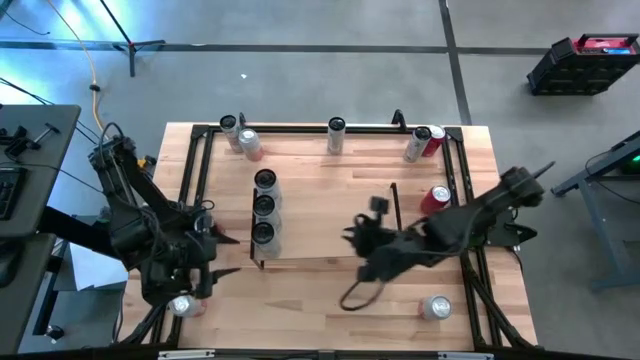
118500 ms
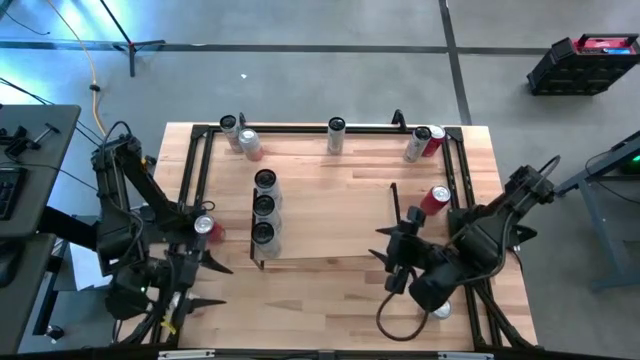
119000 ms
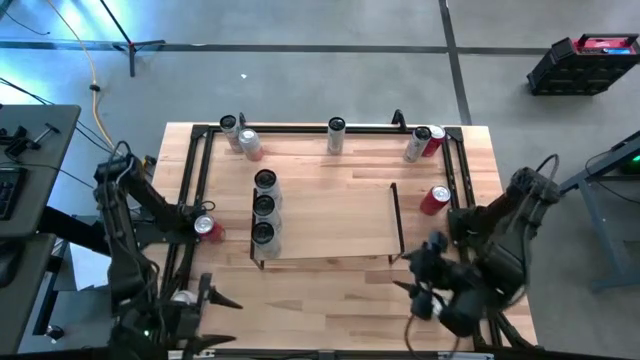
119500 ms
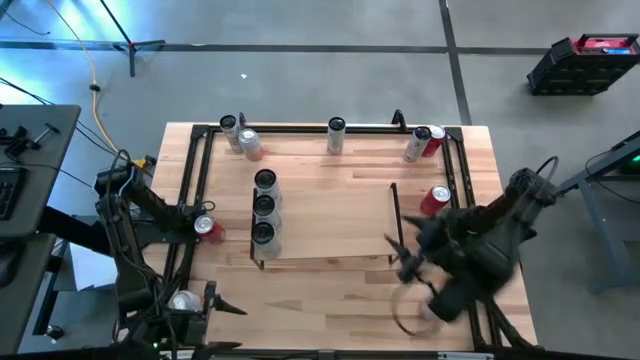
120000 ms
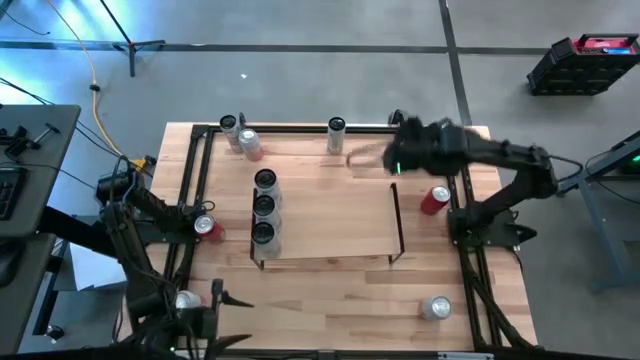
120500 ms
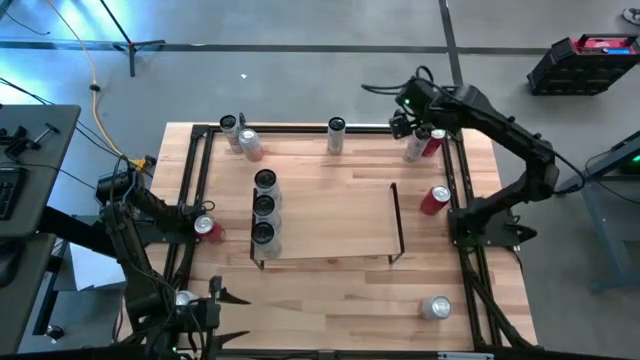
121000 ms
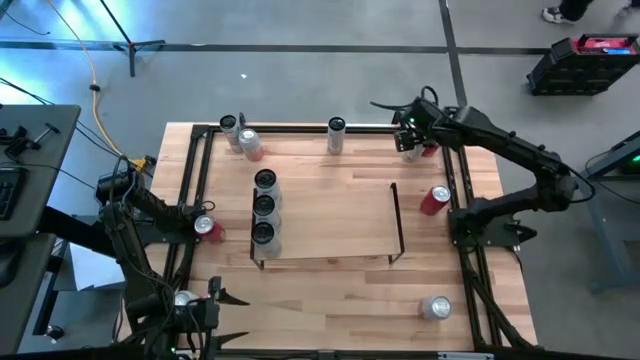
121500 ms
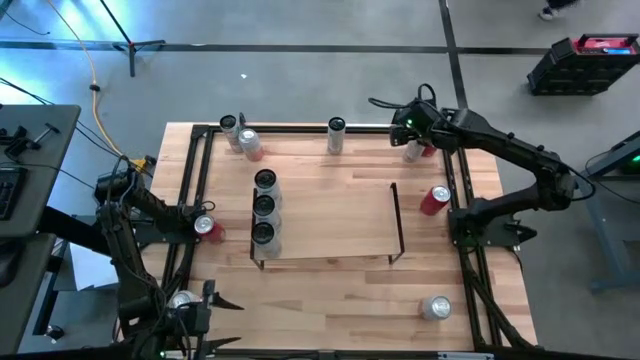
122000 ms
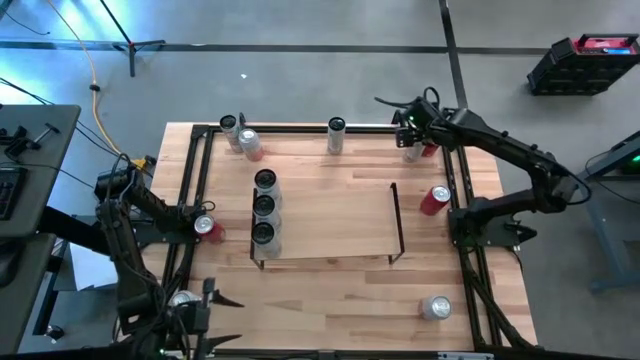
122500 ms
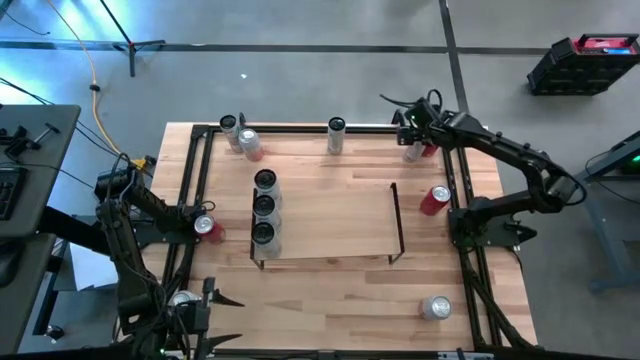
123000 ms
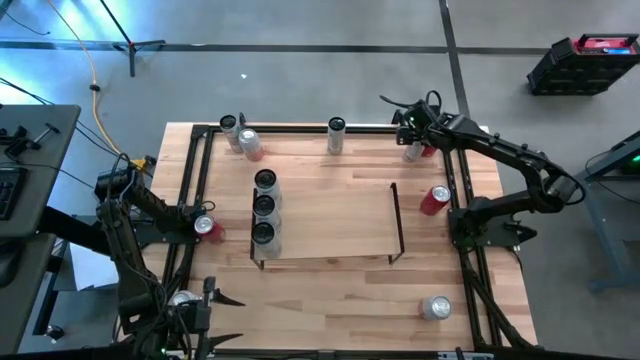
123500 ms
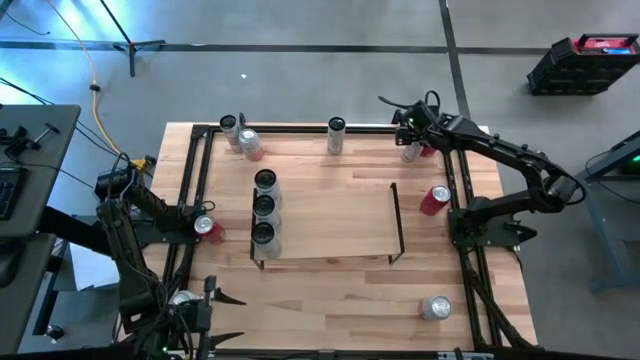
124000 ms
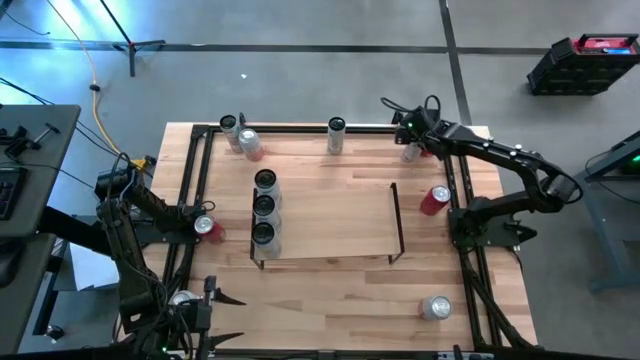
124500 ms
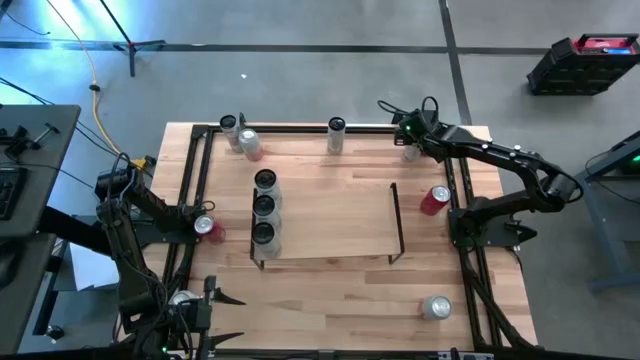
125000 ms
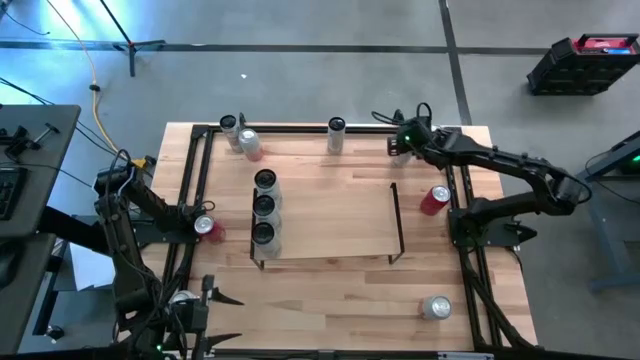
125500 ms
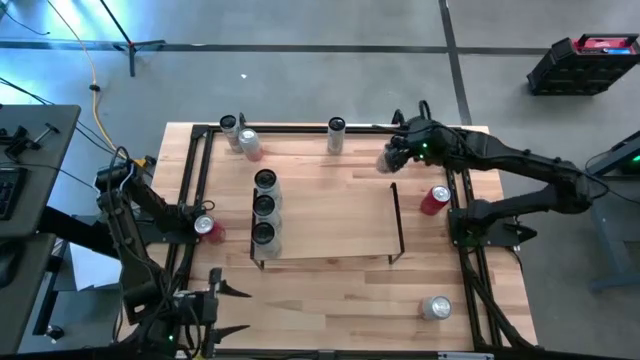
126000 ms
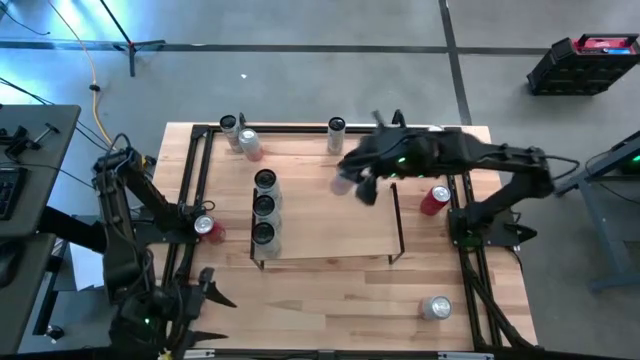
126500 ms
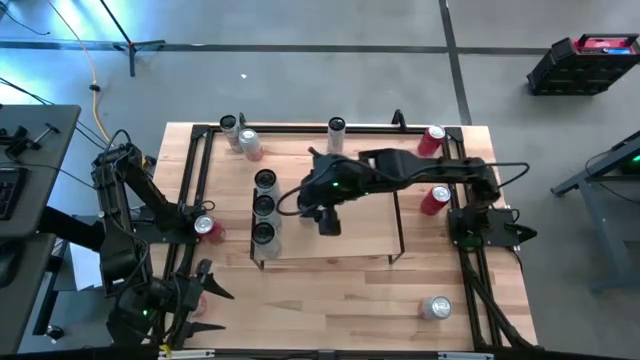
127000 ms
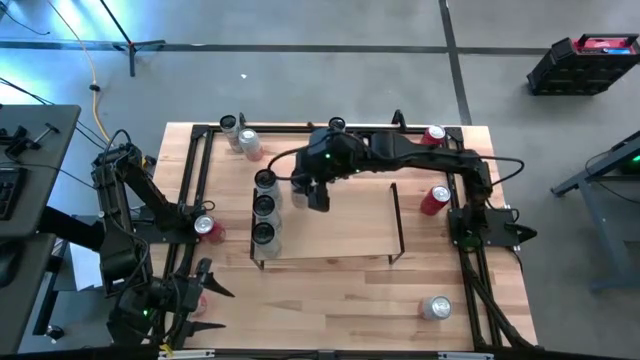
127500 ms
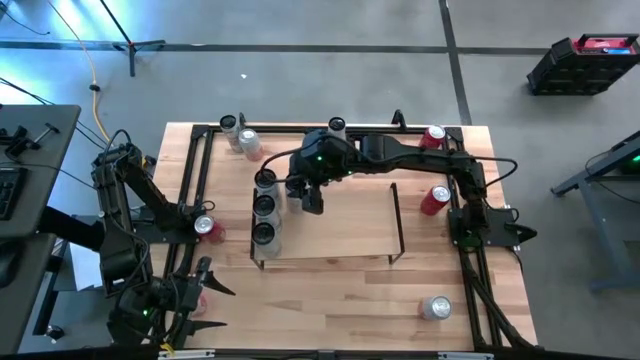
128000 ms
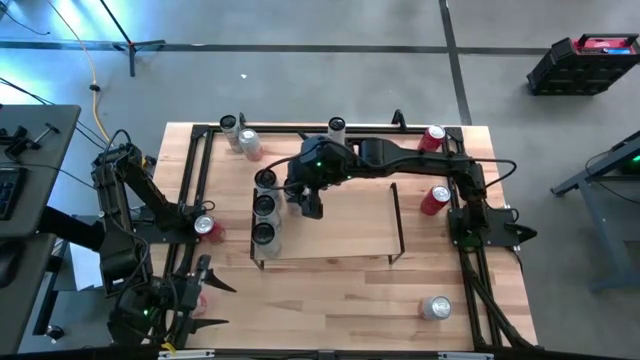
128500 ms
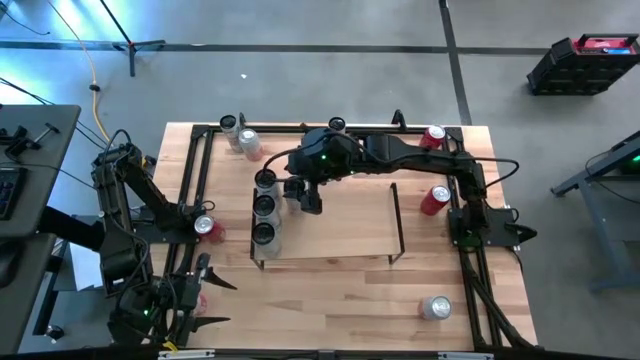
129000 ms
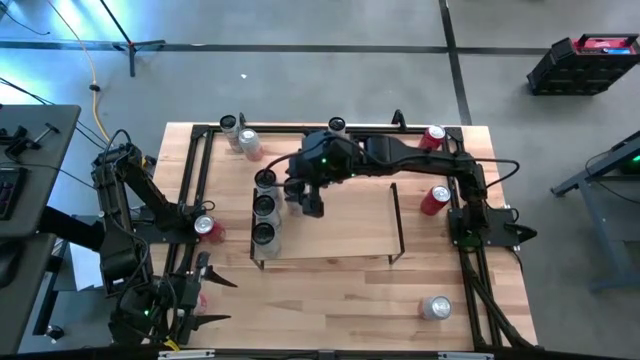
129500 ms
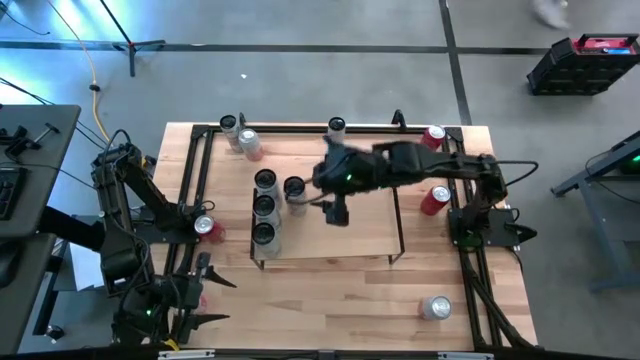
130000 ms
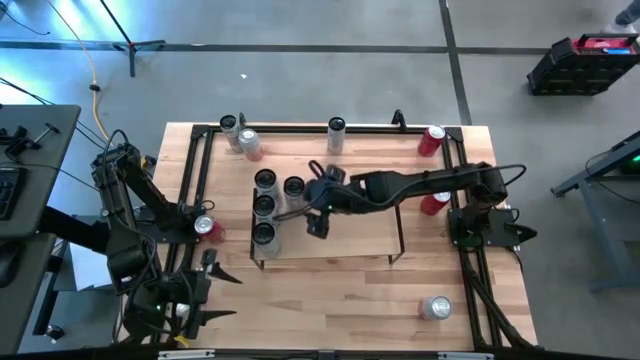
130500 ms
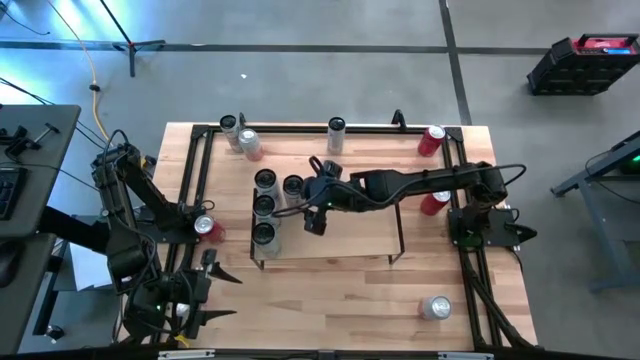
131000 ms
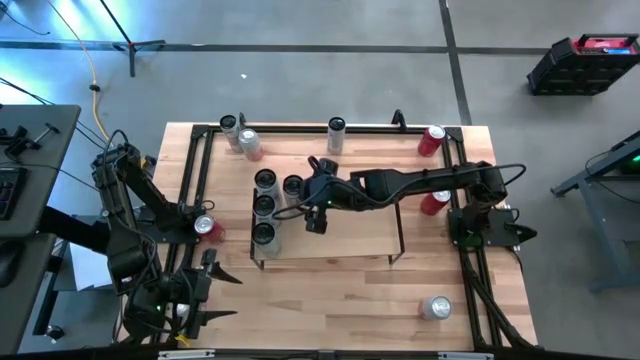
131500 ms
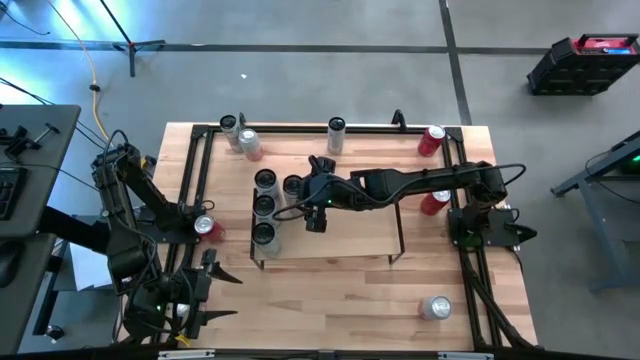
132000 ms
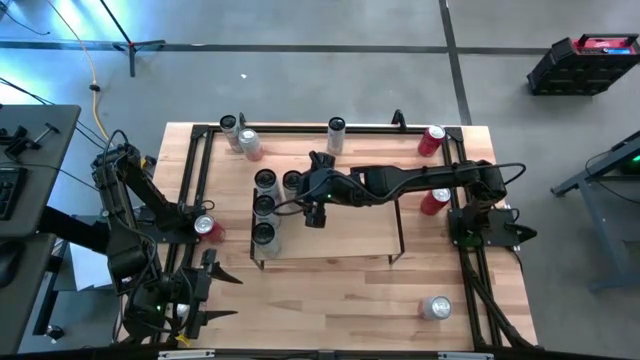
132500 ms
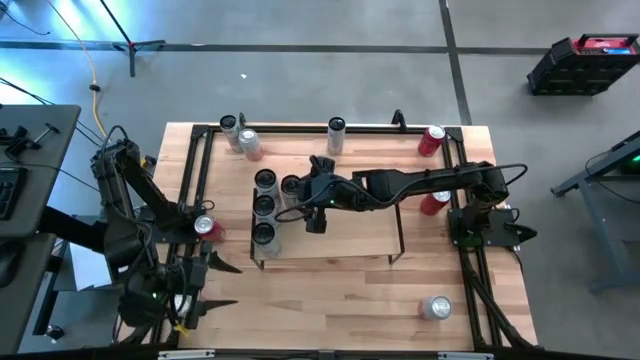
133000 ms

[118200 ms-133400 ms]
Task: Place canned beverage on shelf
Put the right white pink soda can on the shelf

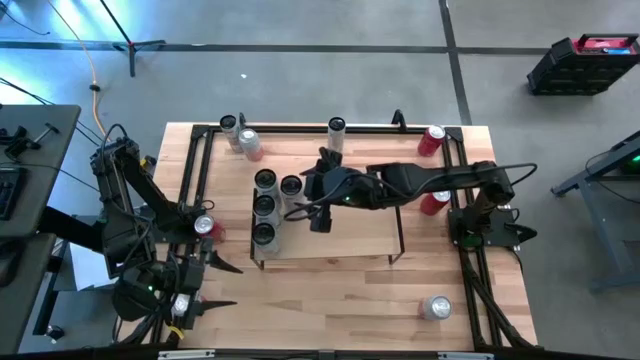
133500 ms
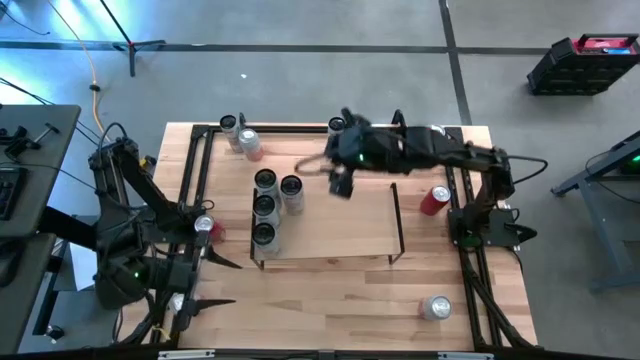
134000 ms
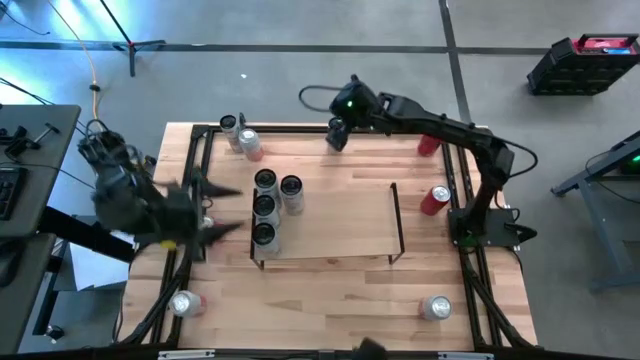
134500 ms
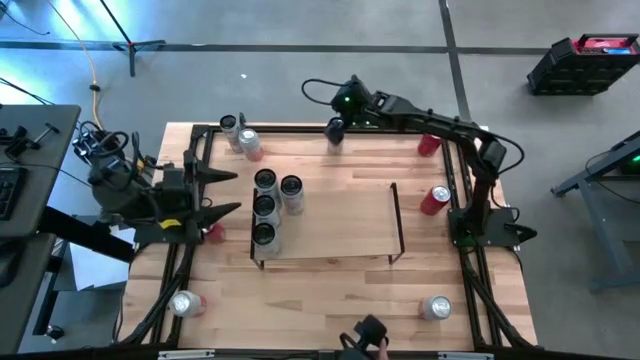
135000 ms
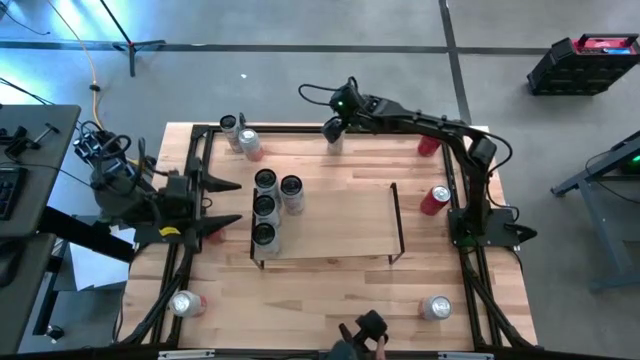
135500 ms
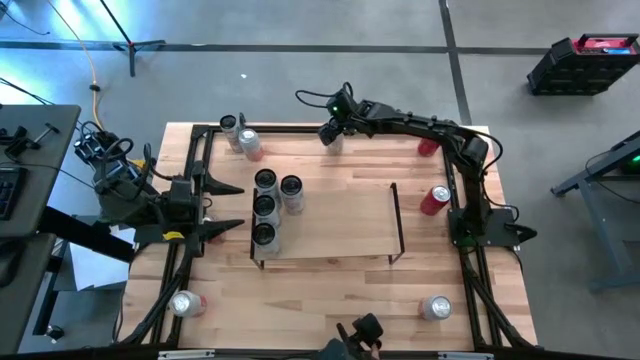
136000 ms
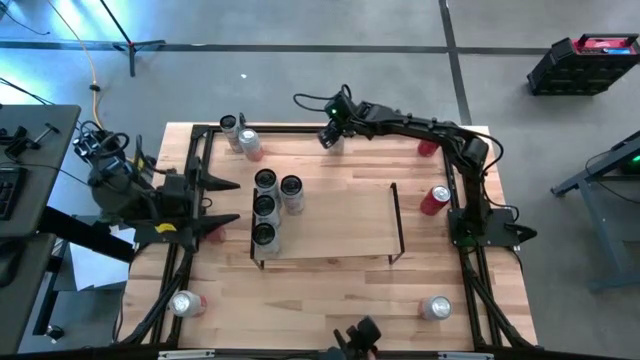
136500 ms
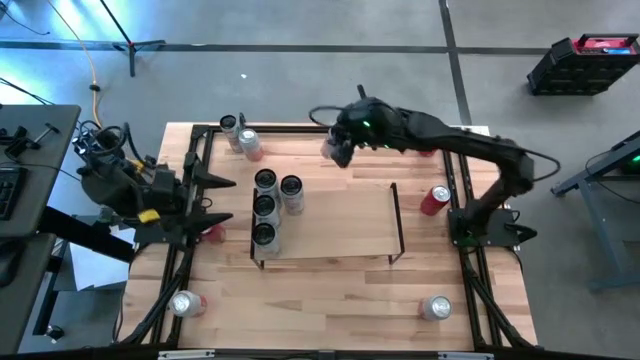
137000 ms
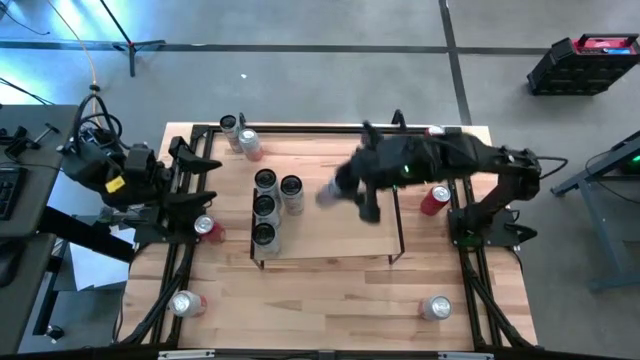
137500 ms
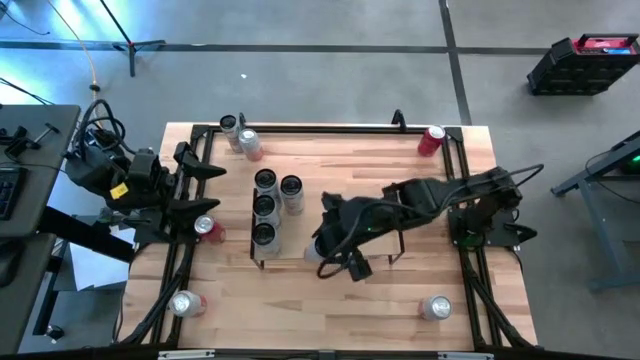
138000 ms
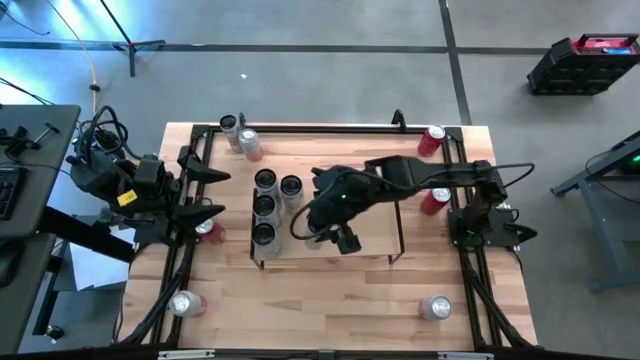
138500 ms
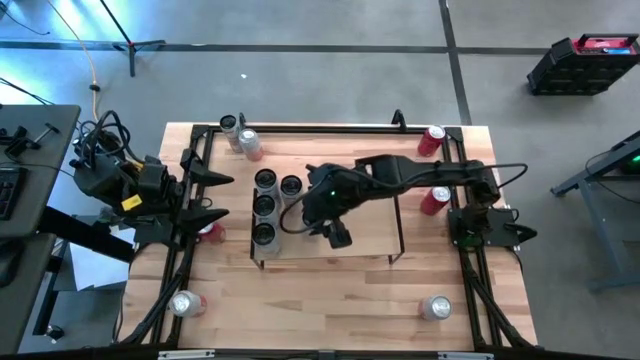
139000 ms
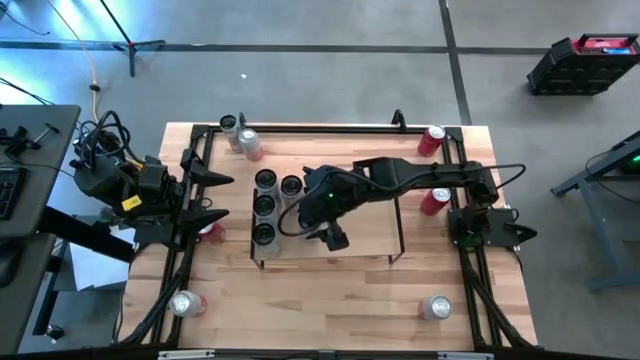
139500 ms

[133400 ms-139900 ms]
Put the right white pink soda can aligned with the other white pink soda can on the shelf
